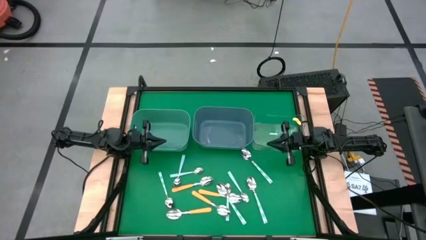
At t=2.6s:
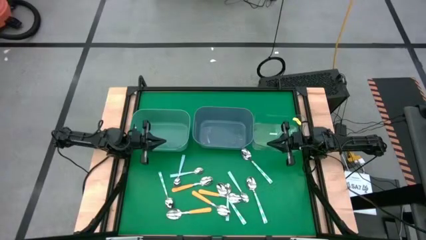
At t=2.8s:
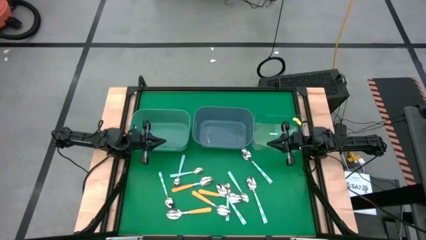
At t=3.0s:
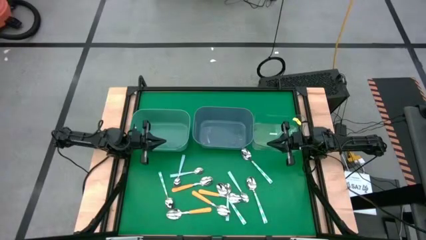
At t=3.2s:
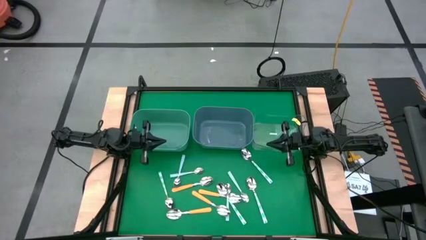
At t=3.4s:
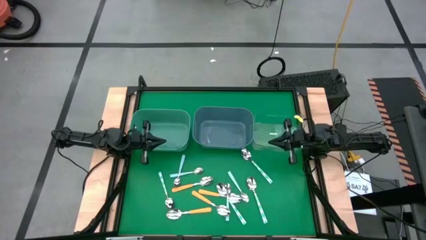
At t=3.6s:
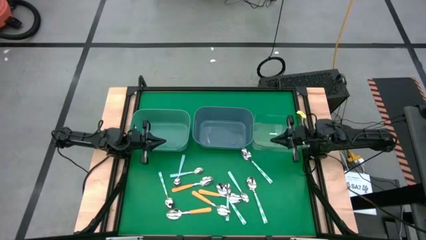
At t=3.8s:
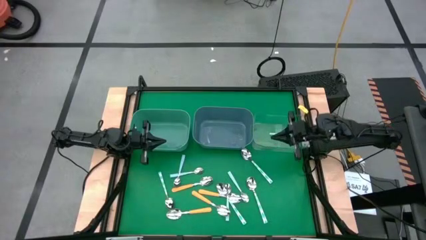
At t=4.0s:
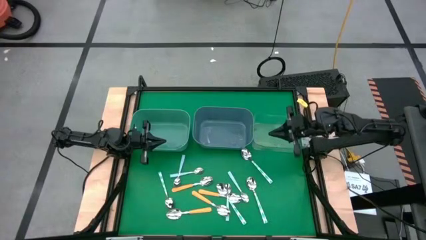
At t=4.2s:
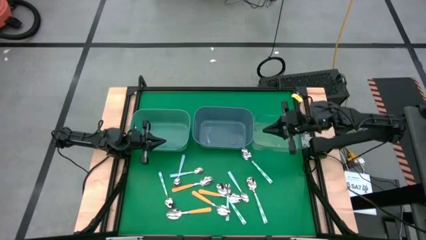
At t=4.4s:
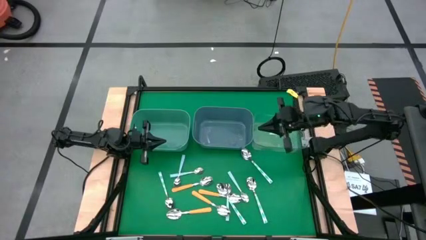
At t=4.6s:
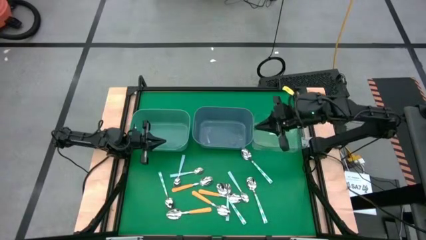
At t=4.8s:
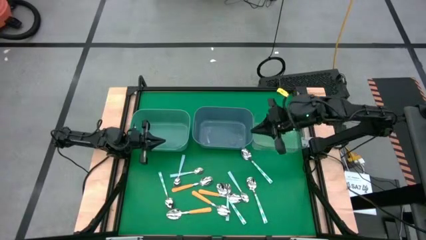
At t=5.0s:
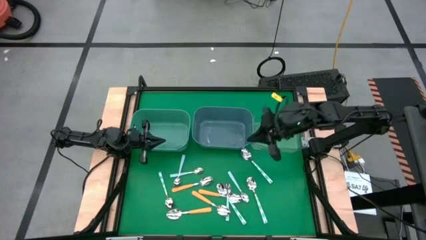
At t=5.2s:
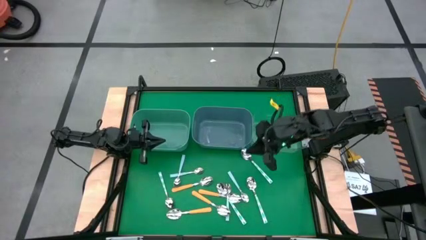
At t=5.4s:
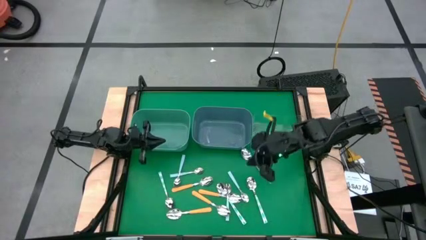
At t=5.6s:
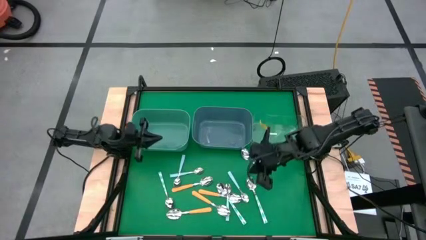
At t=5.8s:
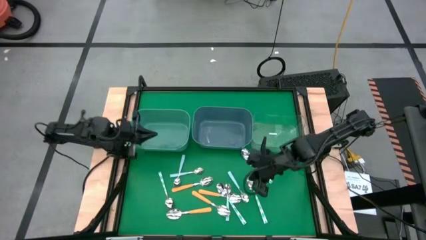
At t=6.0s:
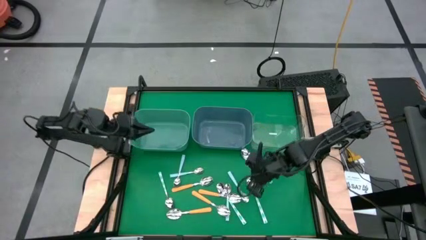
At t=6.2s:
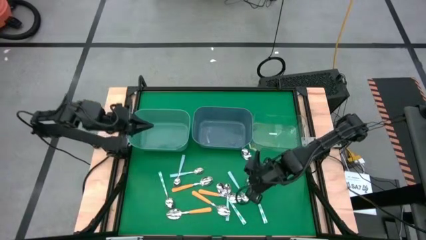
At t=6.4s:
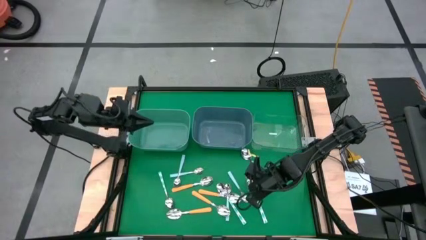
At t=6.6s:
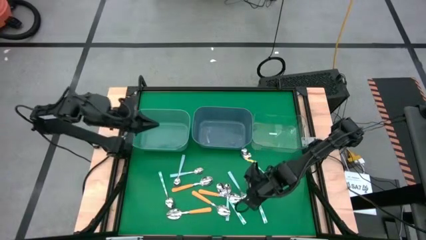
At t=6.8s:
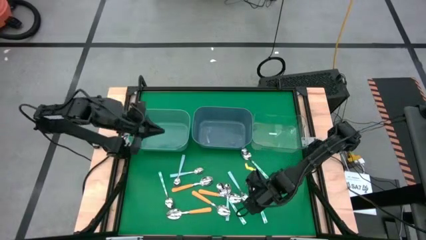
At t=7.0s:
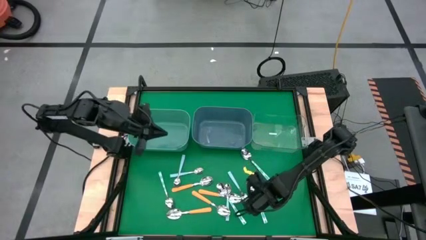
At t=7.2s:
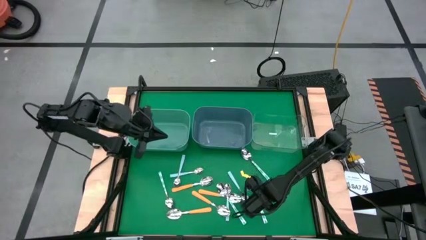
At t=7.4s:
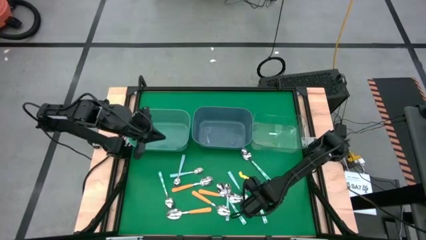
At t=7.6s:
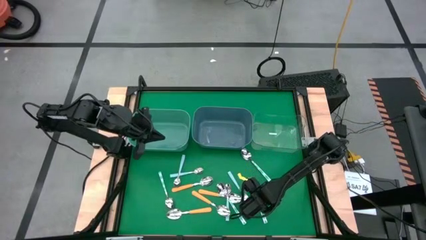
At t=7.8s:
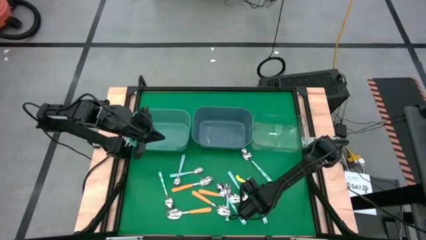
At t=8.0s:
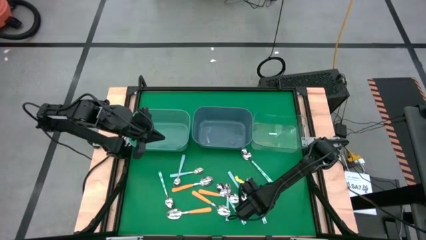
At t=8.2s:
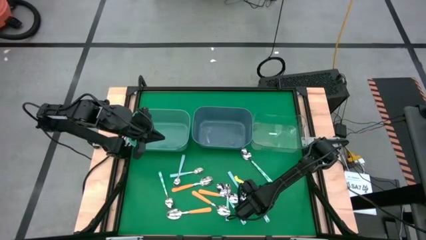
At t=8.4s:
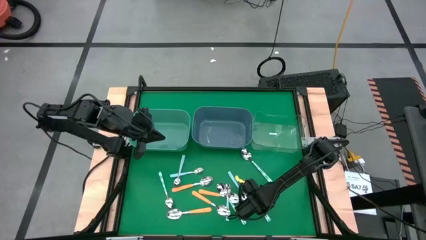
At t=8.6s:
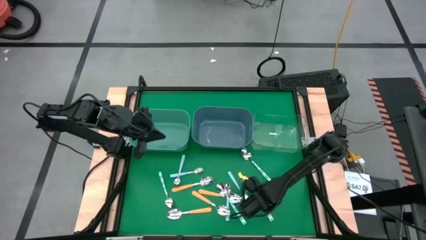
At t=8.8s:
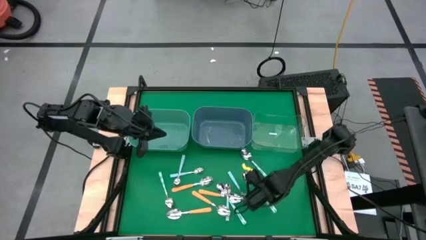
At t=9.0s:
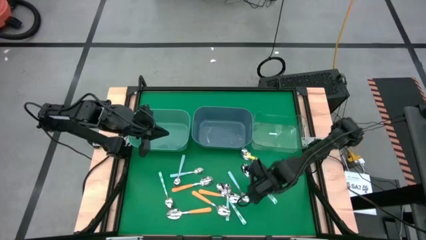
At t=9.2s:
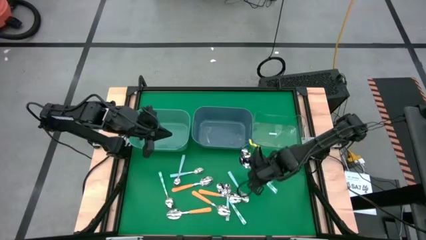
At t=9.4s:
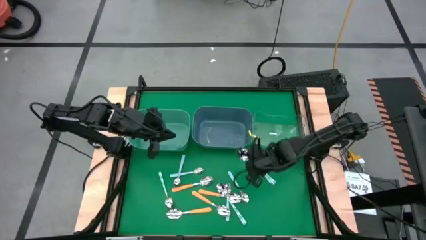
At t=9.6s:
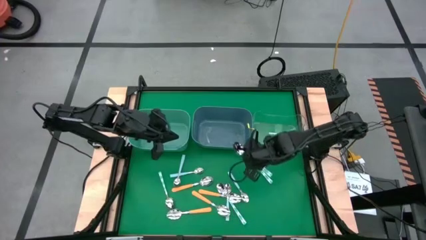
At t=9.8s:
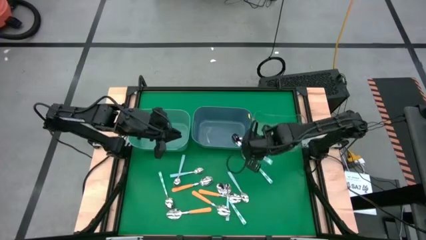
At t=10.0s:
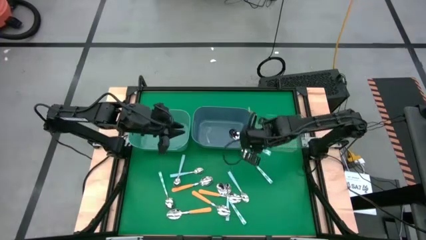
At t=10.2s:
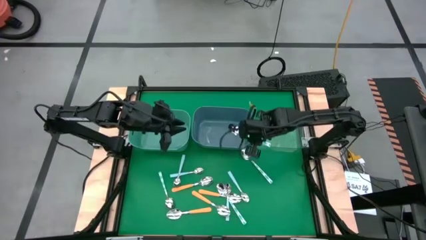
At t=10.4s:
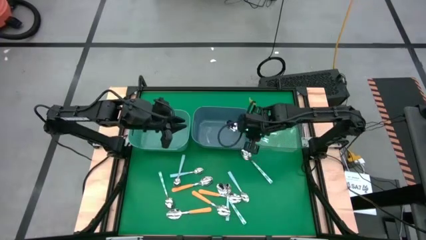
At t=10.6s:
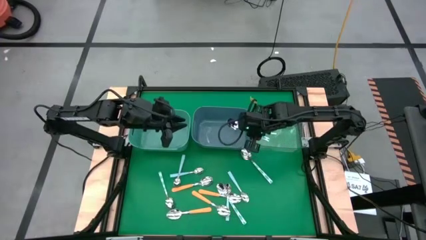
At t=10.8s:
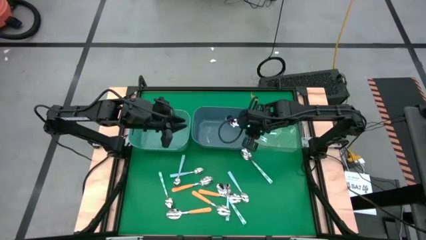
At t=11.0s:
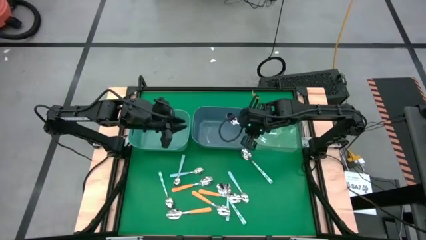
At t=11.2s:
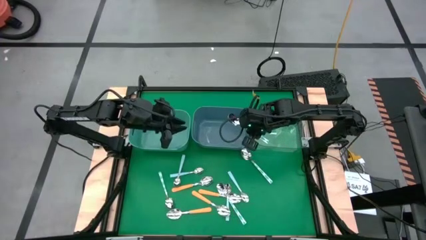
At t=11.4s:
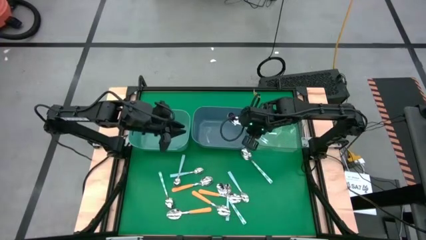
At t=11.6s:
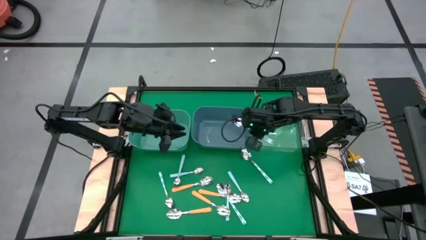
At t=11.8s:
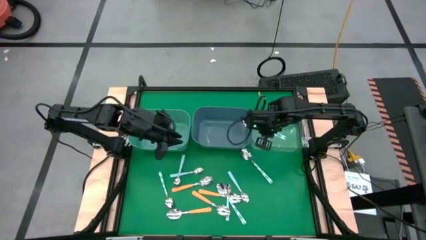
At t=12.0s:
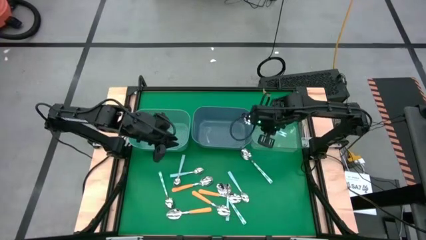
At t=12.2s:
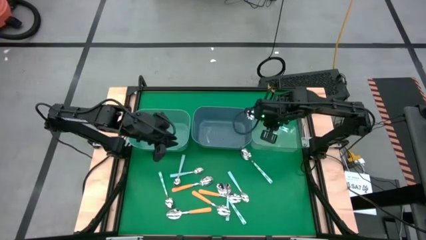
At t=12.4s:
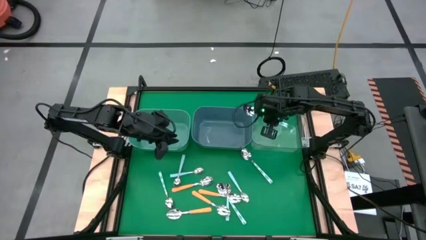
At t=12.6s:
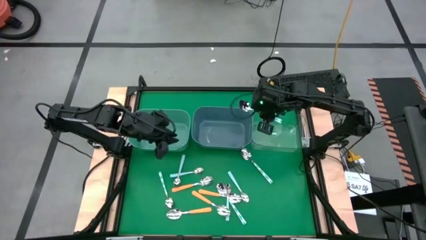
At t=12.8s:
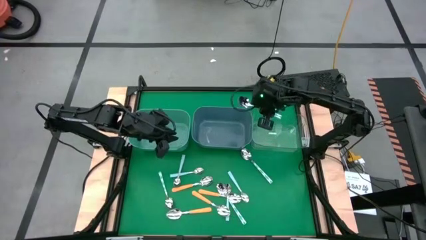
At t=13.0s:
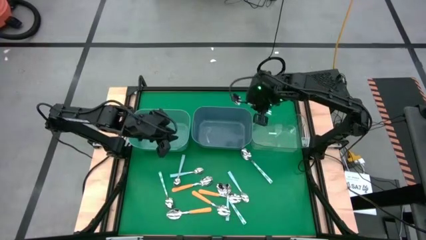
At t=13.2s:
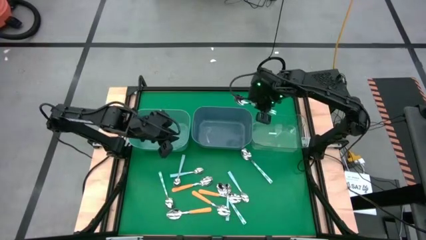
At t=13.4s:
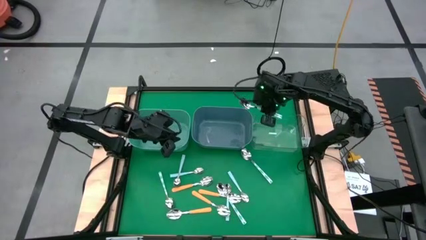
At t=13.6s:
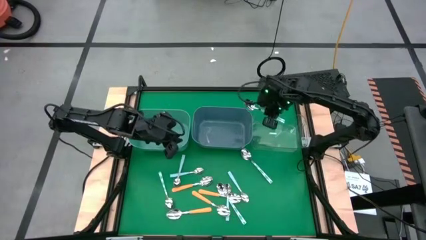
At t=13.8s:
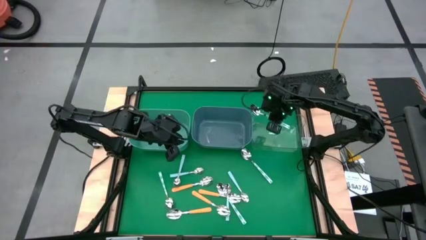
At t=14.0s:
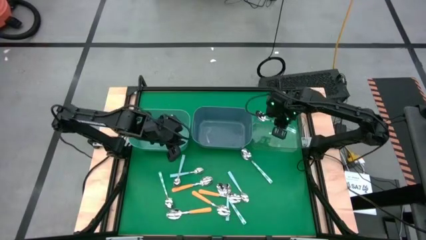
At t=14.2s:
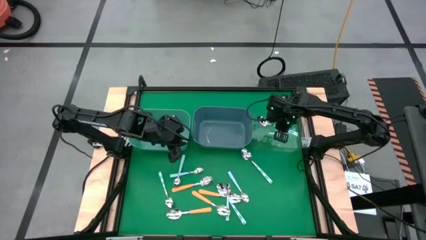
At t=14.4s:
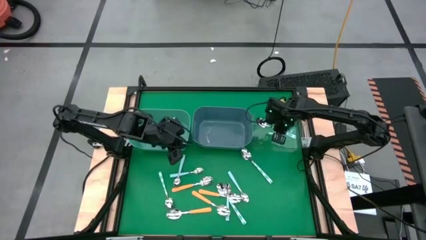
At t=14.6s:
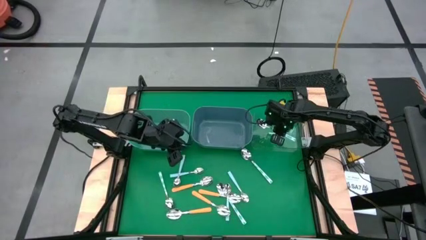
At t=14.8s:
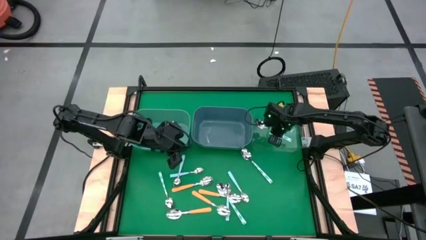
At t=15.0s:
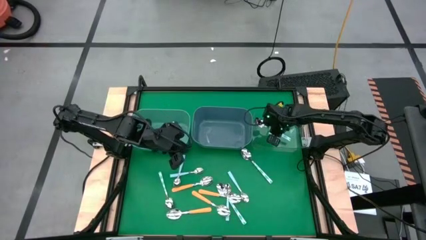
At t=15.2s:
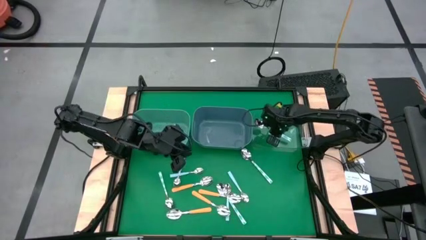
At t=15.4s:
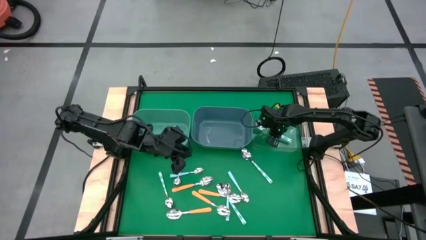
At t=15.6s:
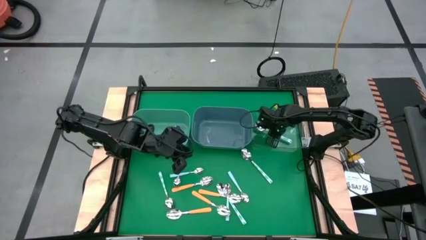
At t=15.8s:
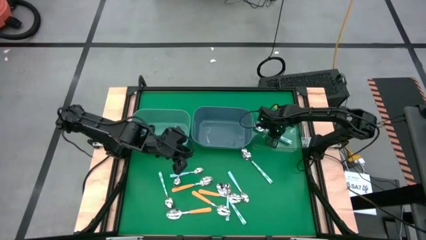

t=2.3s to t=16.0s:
Task: Sort silverware by color (type)
Put the white spoon into the transparent bin

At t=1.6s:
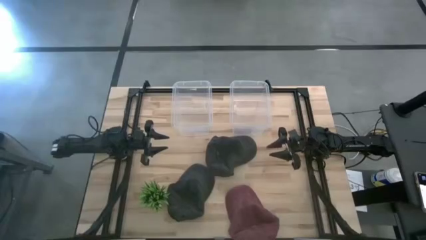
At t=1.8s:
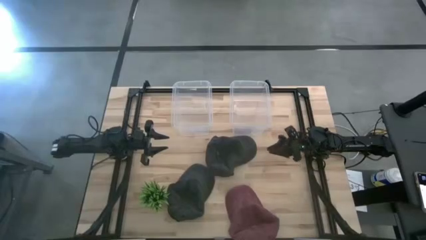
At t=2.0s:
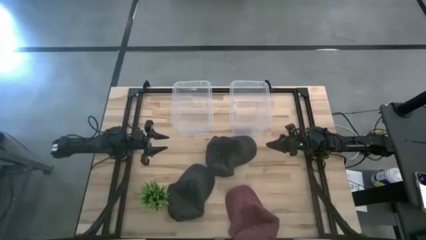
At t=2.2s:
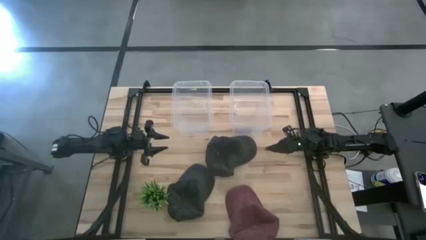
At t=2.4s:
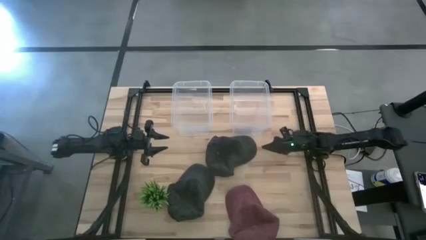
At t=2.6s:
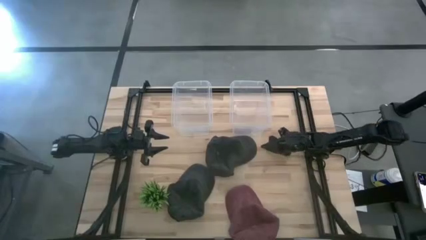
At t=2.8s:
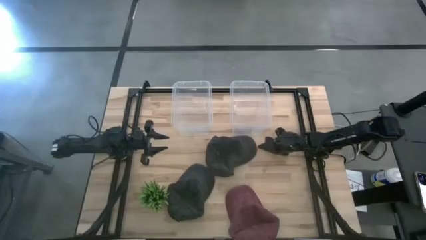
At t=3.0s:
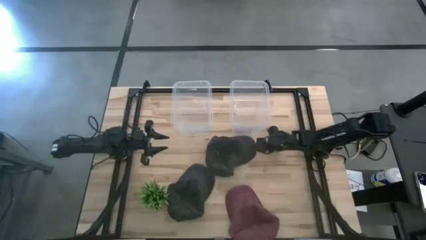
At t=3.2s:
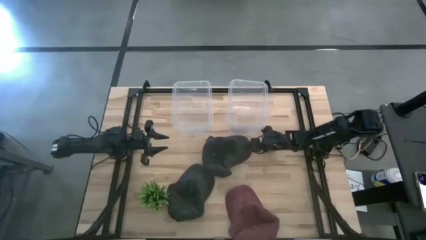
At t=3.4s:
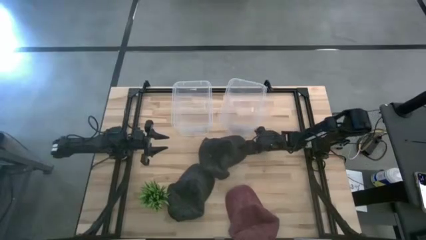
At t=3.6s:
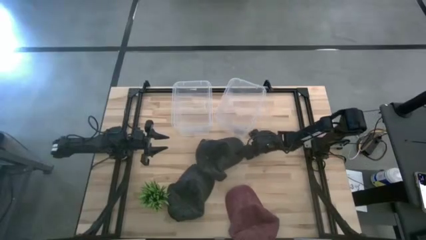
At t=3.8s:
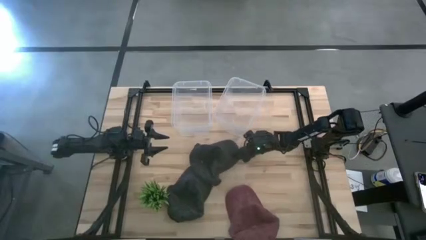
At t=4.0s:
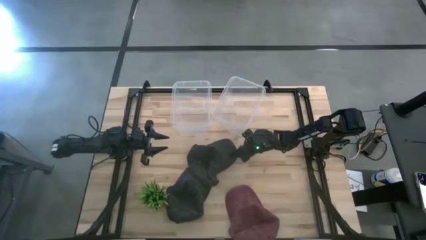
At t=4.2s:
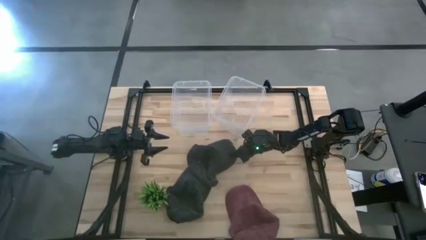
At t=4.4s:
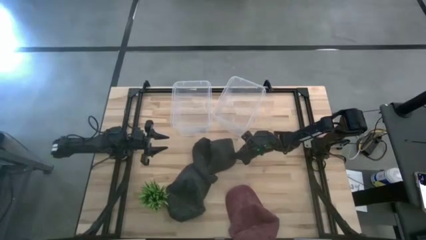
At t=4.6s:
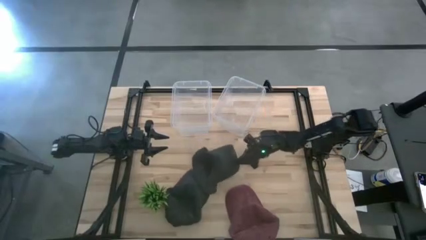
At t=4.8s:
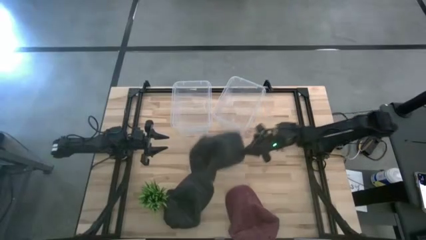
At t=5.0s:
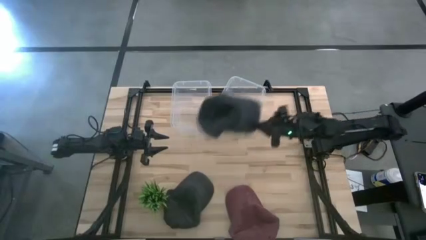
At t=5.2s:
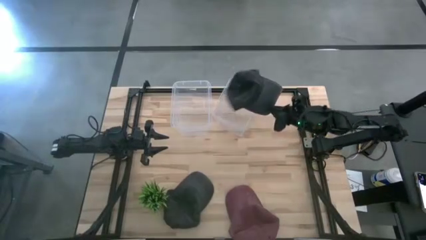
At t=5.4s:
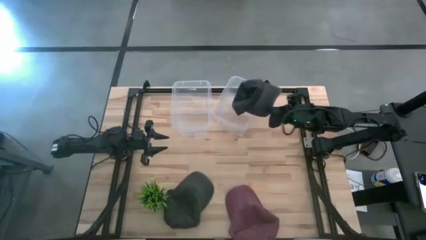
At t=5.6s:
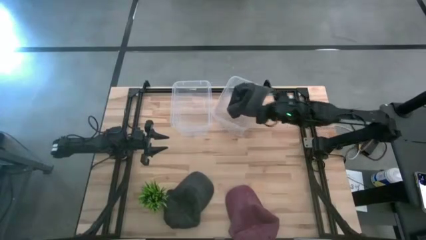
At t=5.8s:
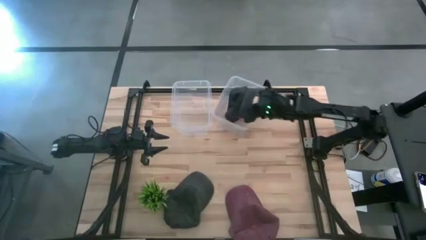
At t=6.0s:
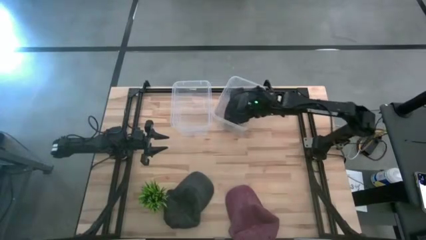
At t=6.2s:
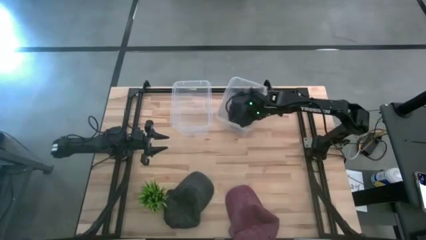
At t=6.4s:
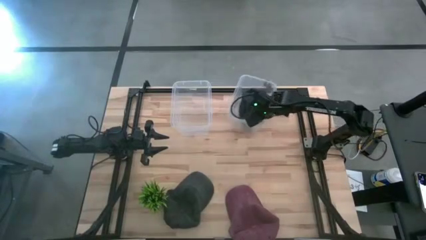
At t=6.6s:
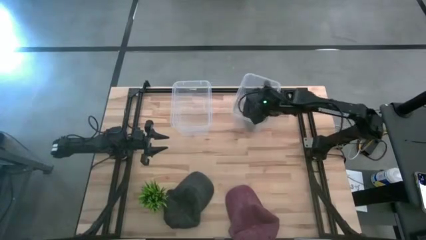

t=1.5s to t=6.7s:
Task: Pick & Place hat
Put the top black cap into the right transparent bin
